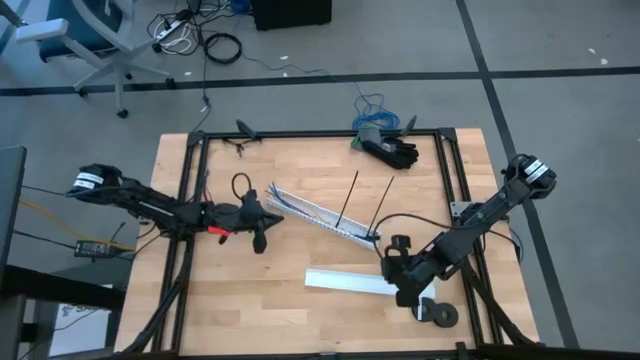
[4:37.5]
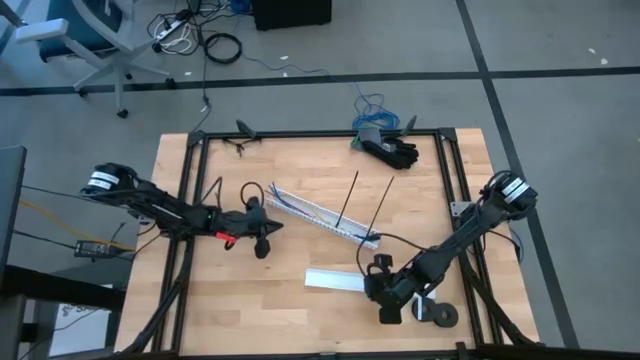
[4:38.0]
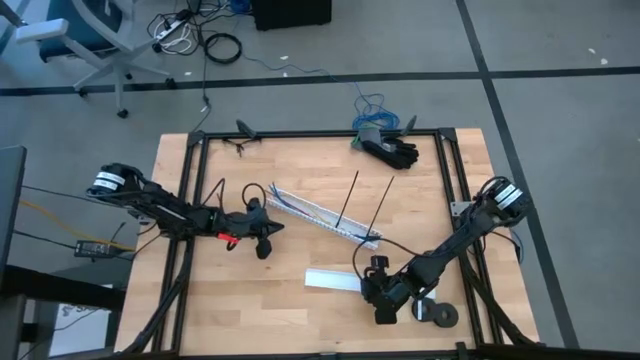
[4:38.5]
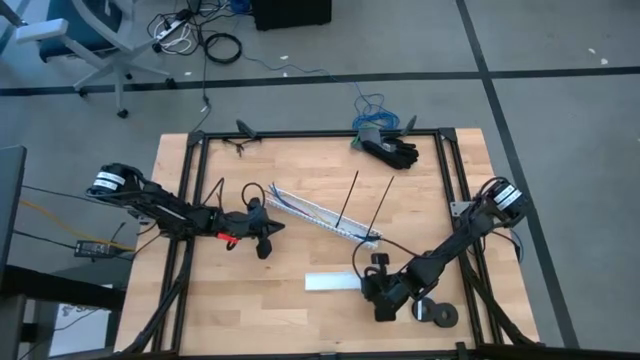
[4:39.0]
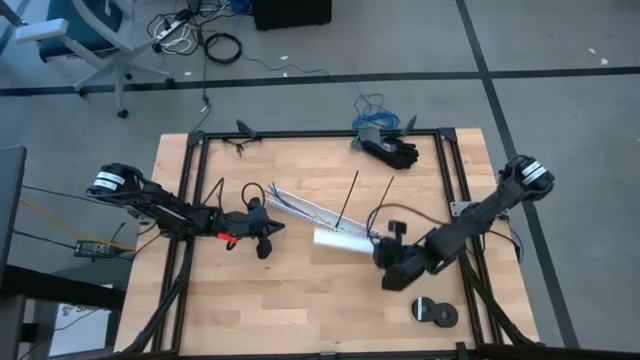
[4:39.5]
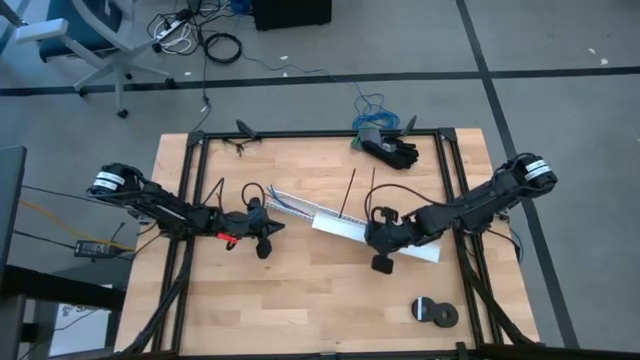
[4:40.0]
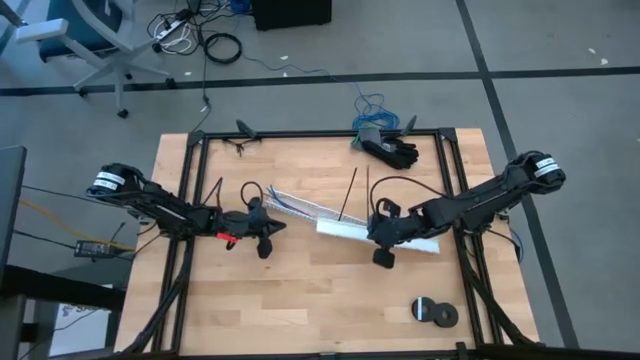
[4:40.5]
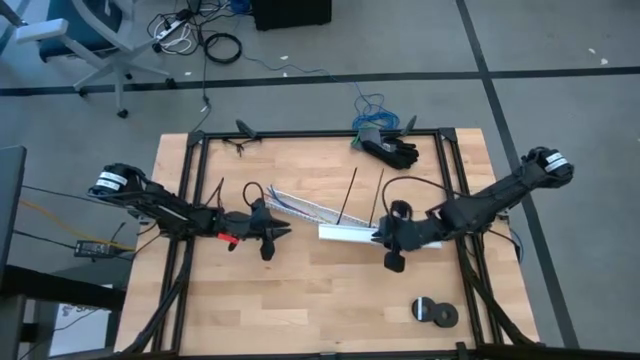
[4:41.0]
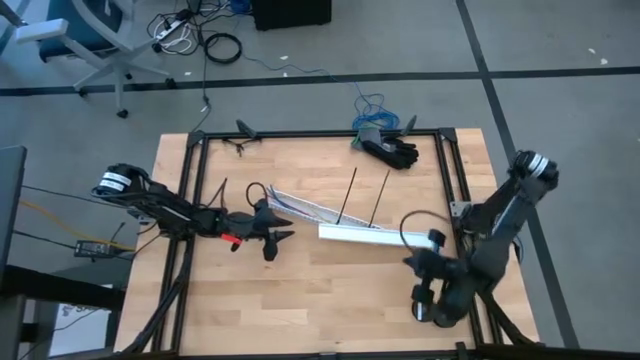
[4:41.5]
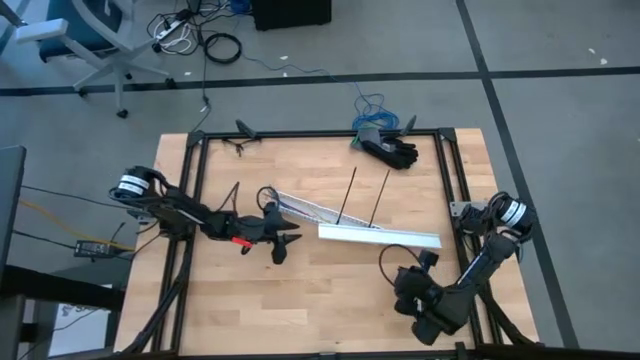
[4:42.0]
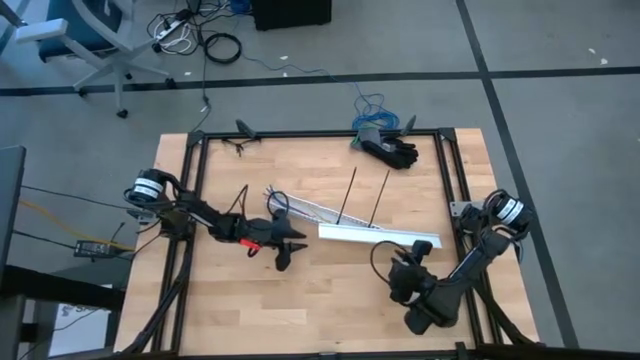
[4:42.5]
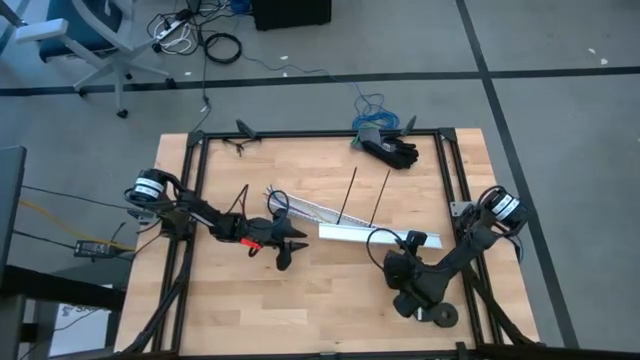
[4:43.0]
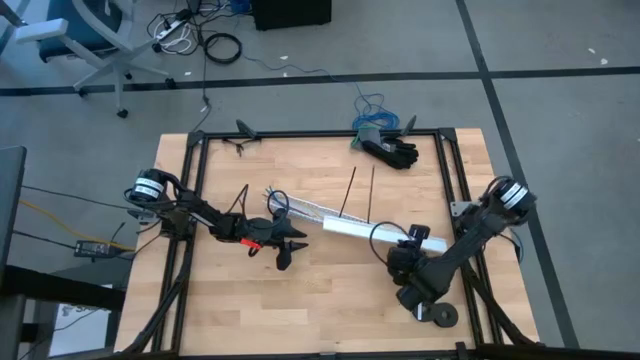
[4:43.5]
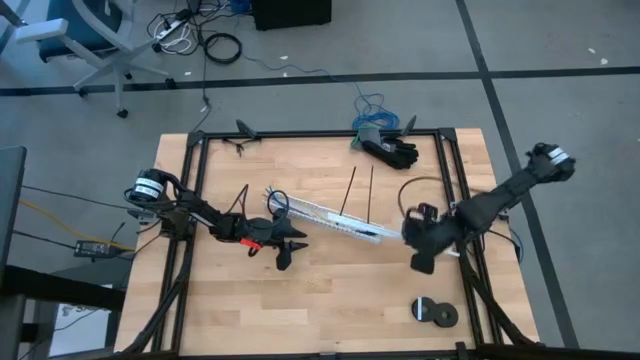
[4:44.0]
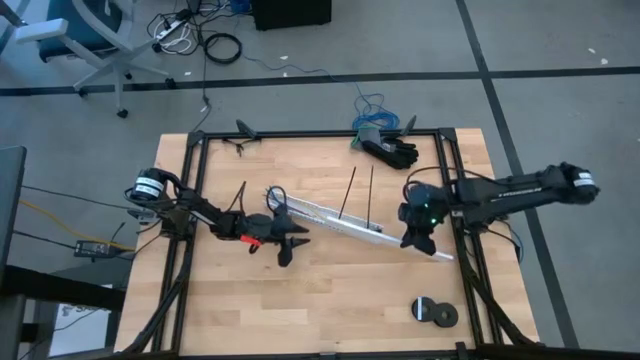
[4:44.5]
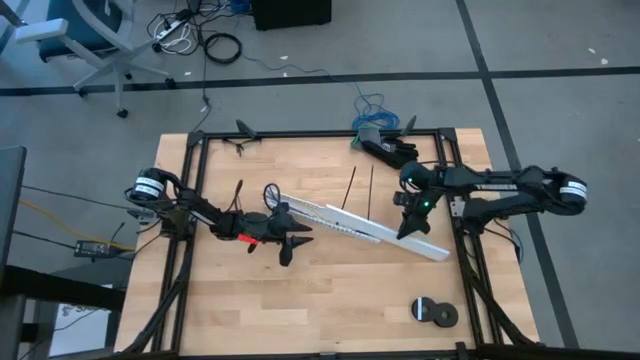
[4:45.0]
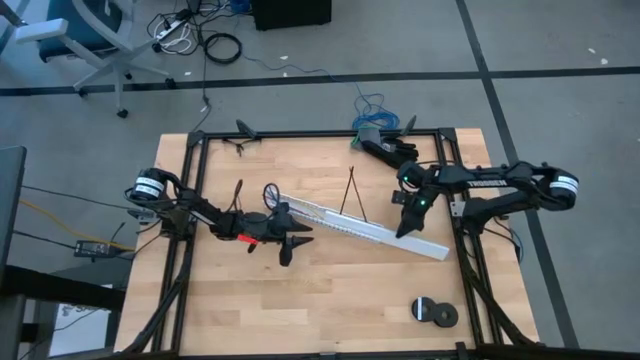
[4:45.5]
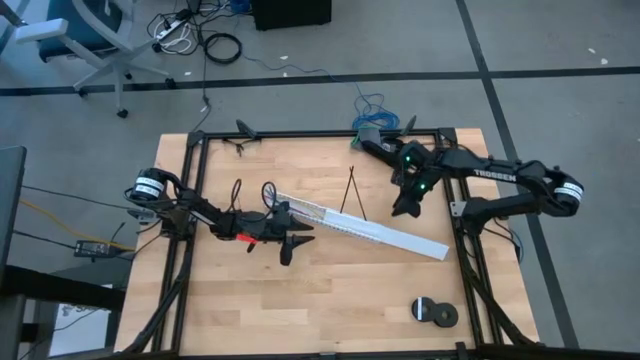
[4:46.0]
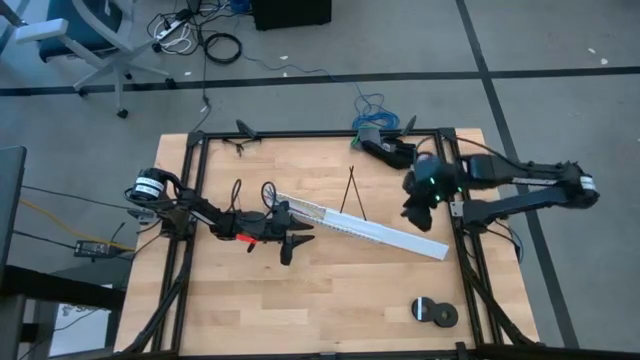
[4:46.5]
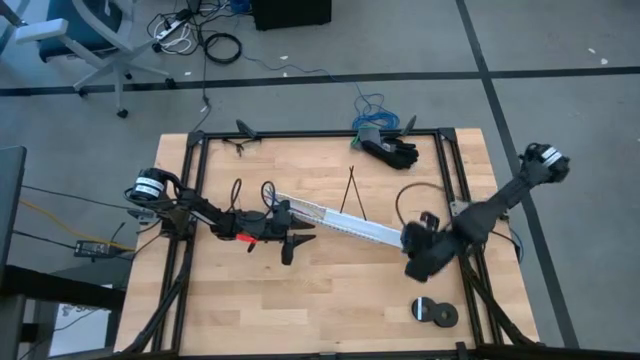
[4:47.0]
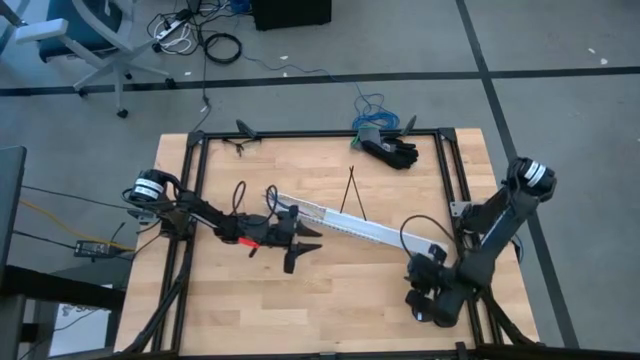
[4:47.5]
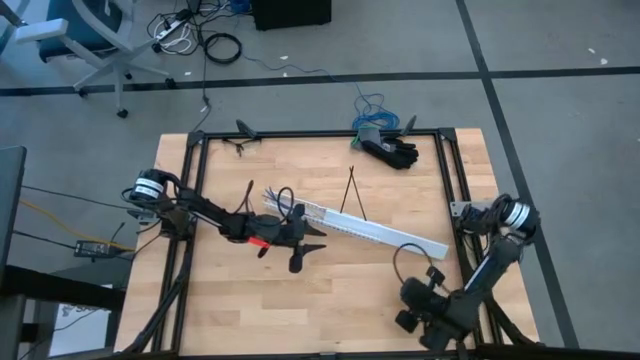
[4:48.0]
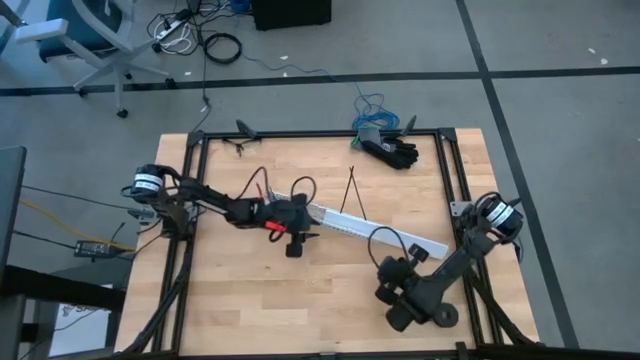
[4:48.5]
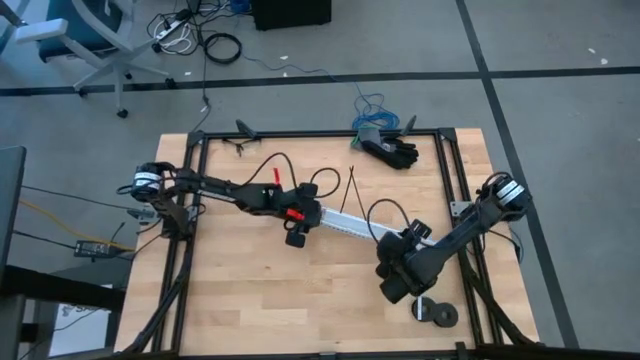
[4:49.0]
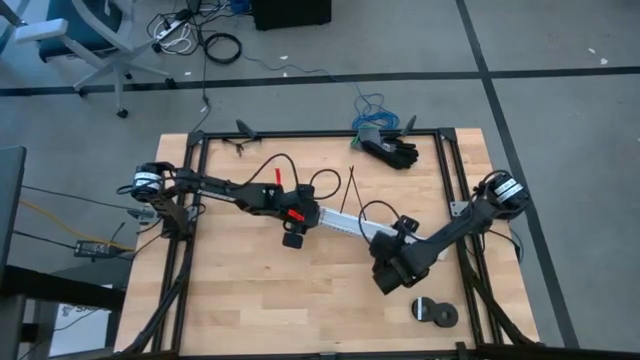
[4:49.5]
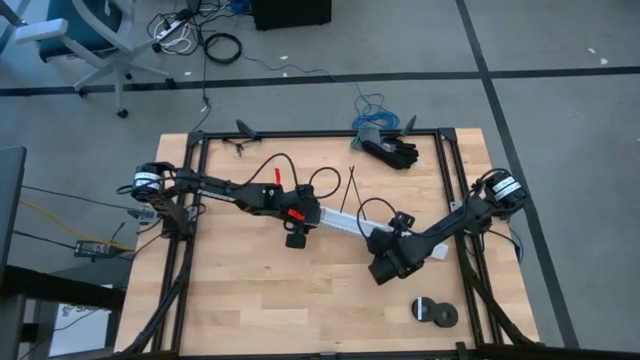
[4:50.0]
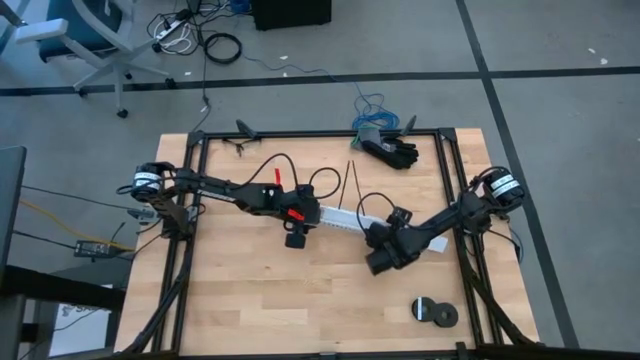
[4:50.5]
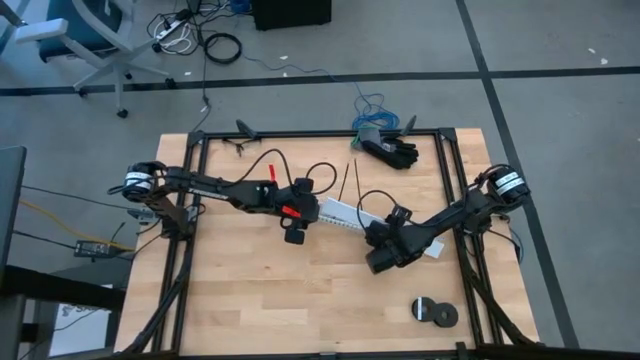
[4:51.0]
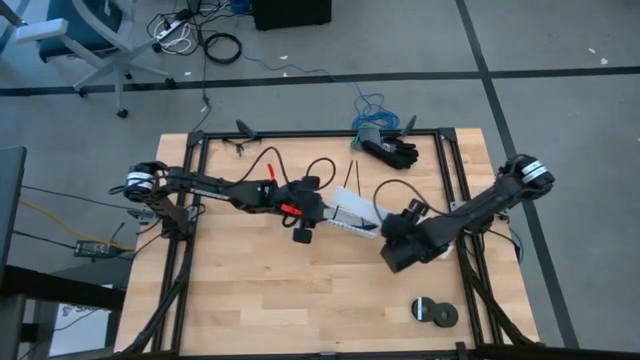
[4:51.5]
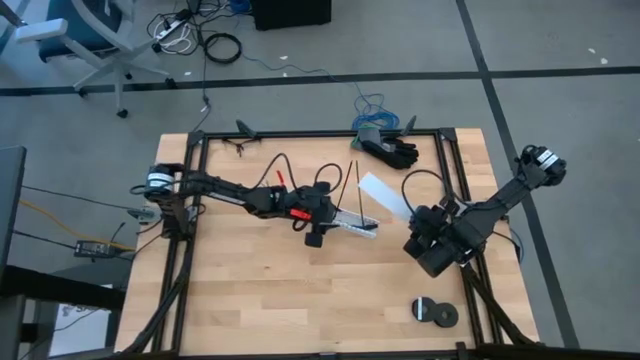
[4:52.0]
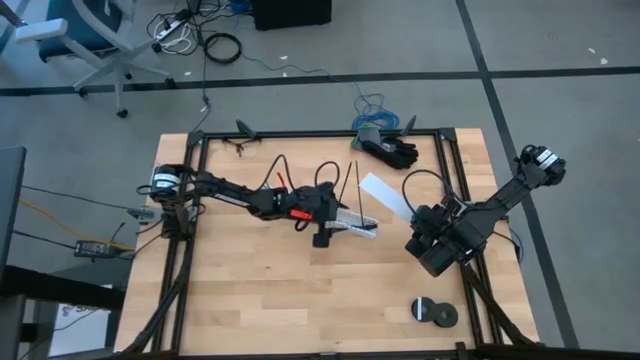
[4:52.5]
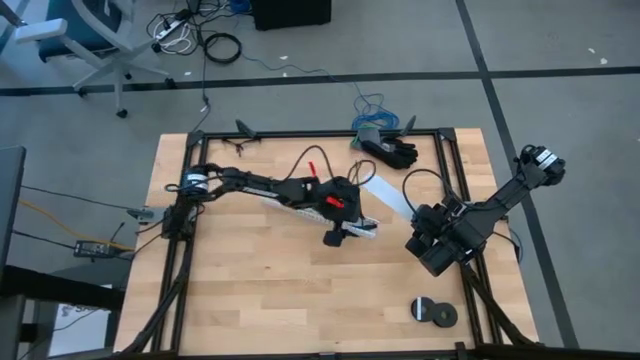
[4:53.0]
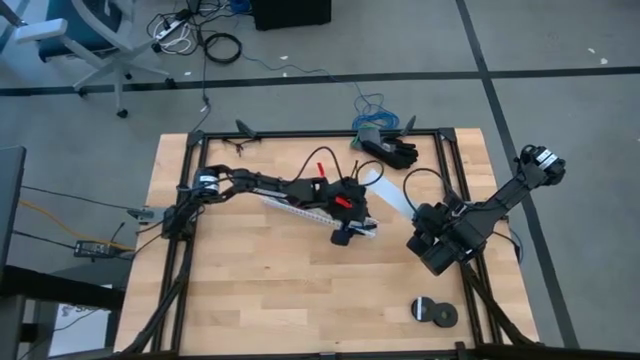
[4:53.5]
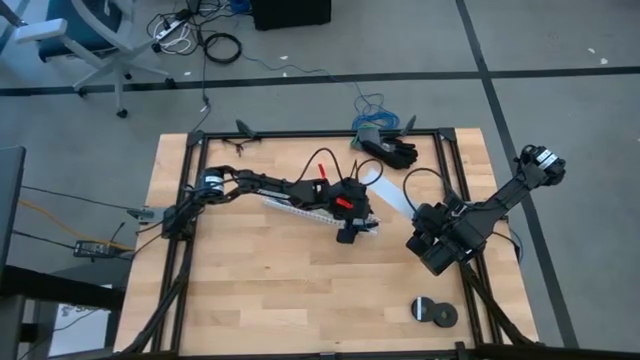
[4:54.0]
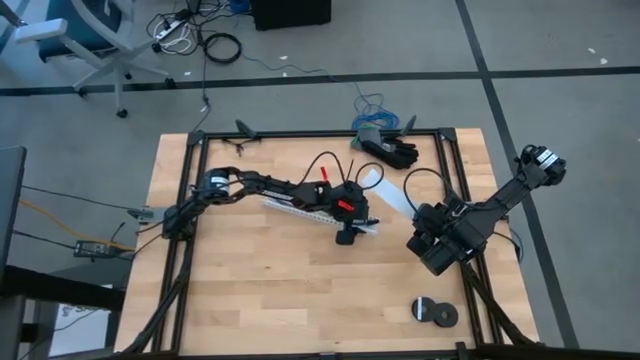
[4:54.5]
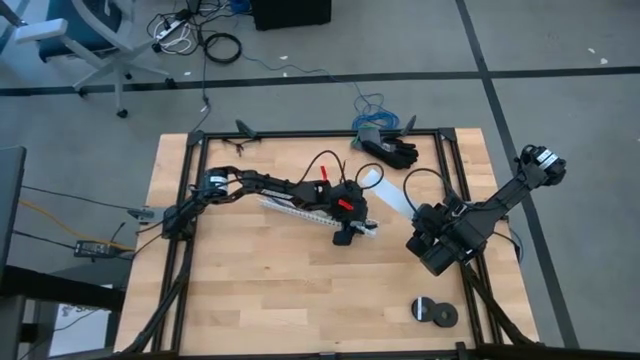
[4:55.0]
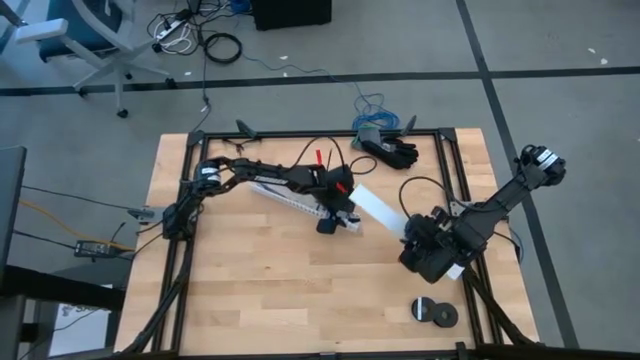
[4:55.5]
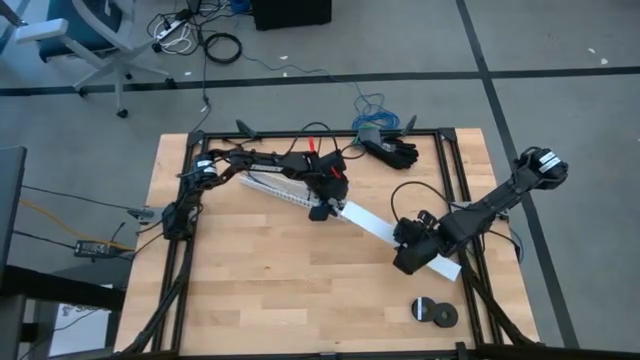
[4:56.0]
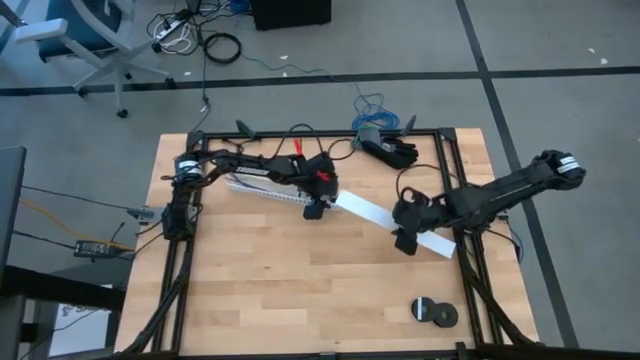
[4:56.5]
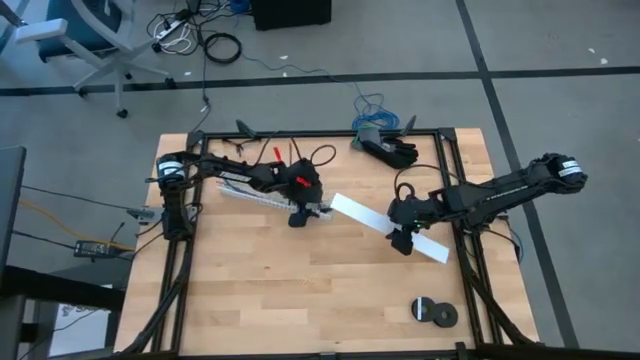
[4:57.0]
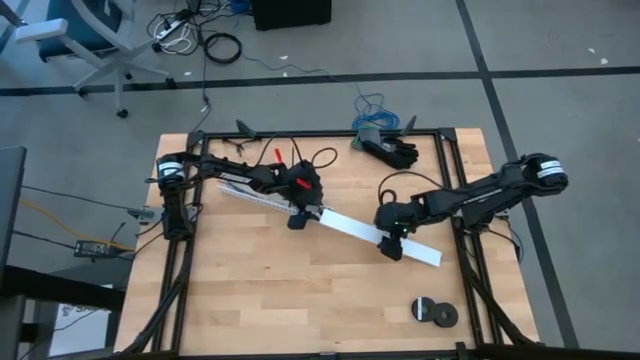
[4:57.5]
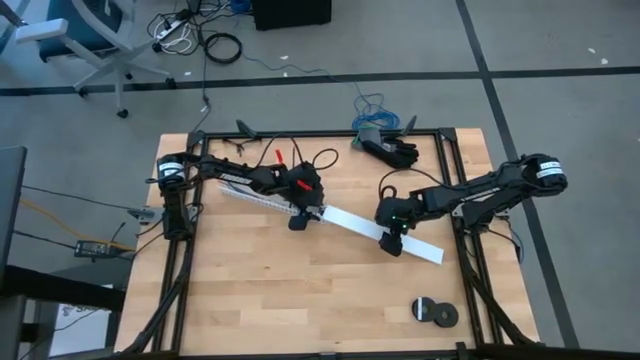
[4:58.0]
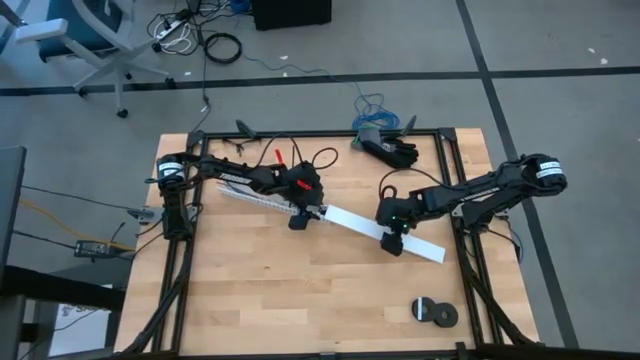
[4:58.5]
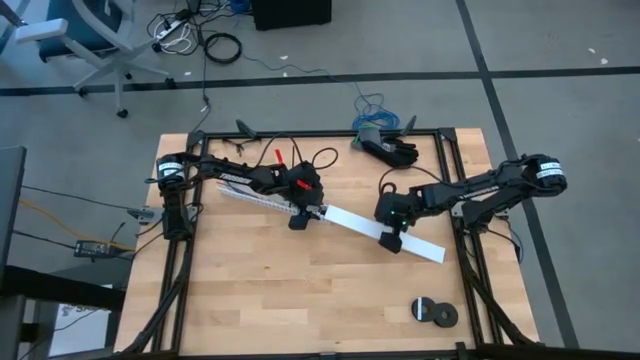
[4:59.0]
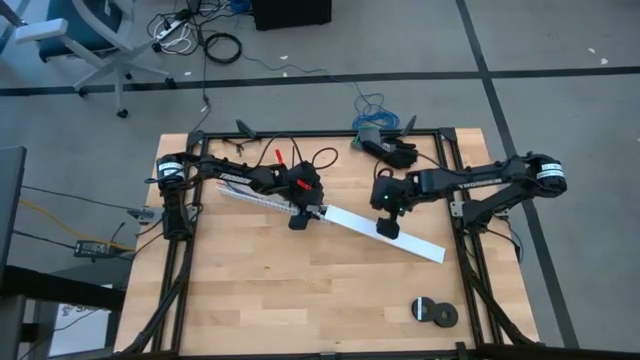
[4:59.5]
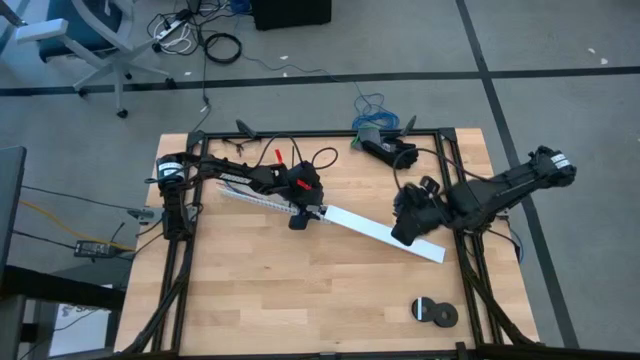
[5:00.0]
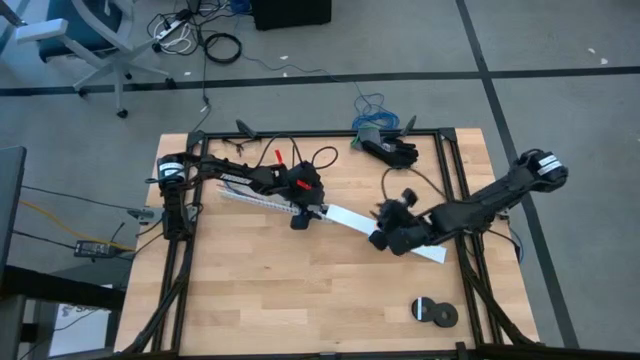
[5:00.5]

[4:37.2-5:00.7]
Task: Ziptie cables
Close the white cable duct lid
